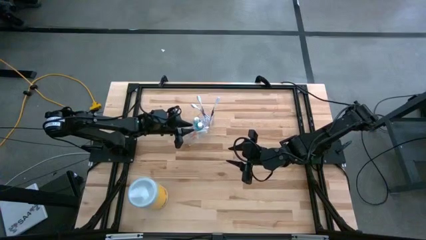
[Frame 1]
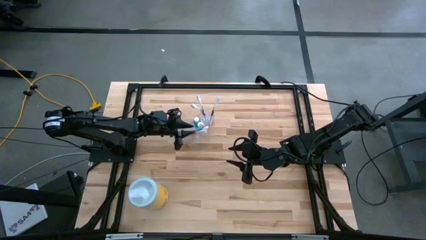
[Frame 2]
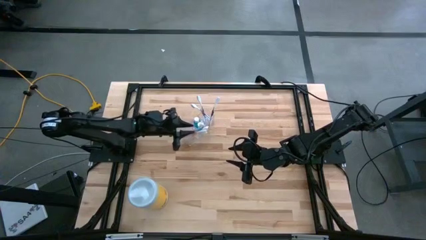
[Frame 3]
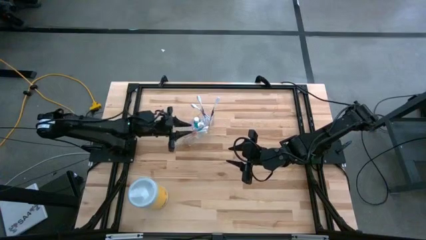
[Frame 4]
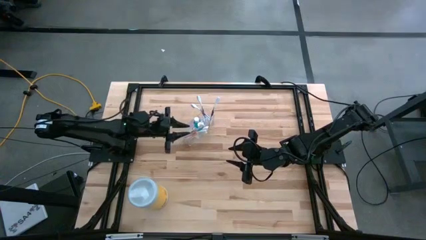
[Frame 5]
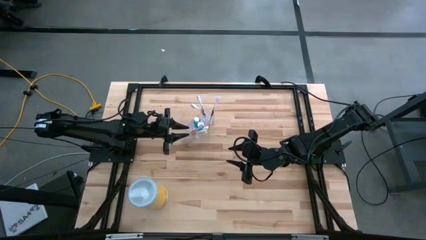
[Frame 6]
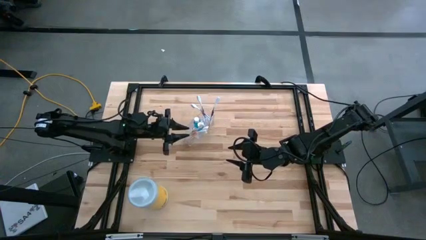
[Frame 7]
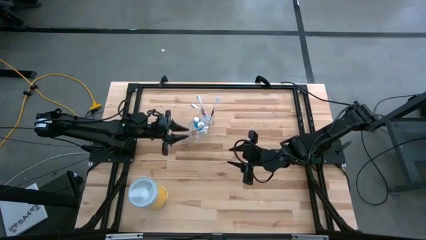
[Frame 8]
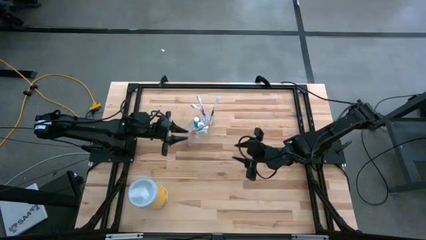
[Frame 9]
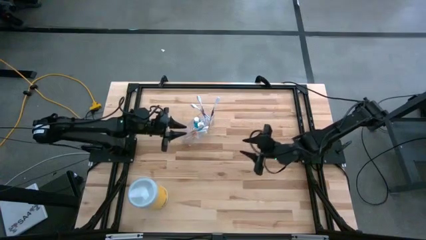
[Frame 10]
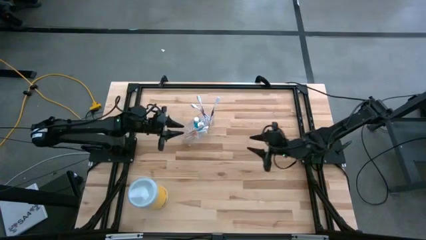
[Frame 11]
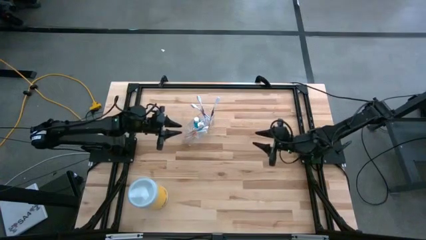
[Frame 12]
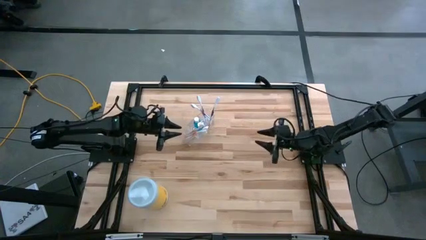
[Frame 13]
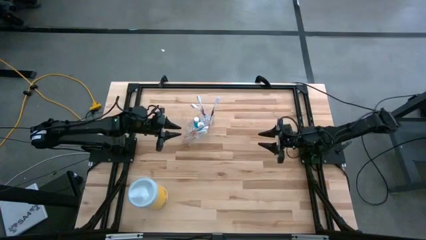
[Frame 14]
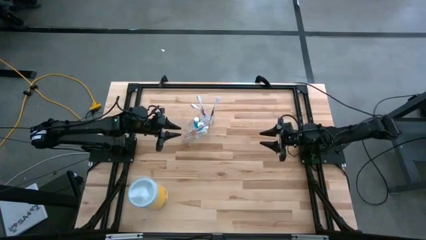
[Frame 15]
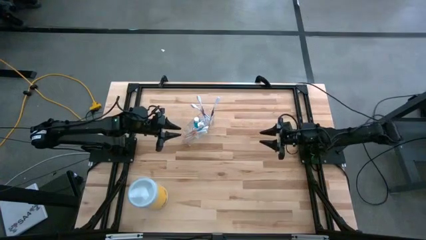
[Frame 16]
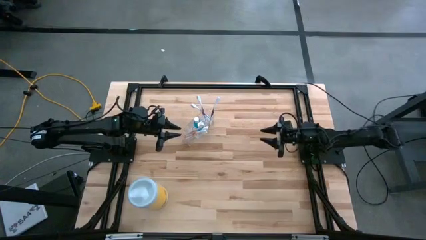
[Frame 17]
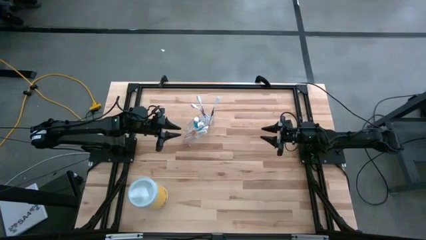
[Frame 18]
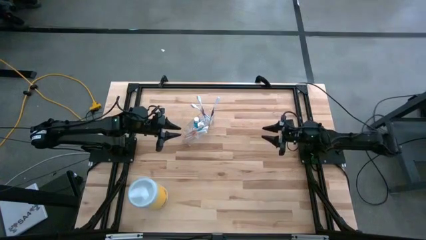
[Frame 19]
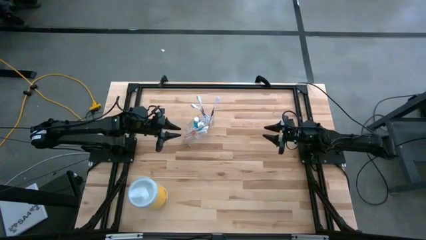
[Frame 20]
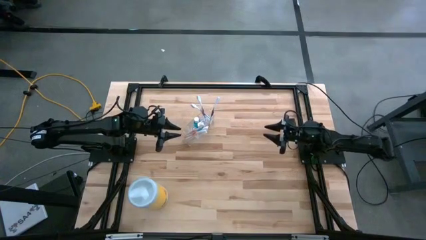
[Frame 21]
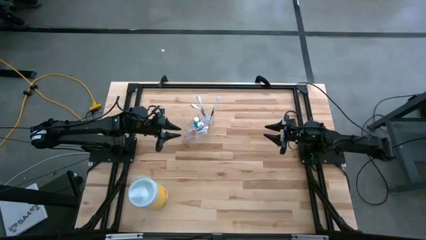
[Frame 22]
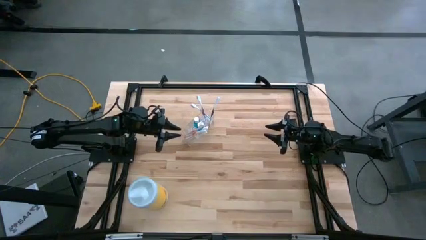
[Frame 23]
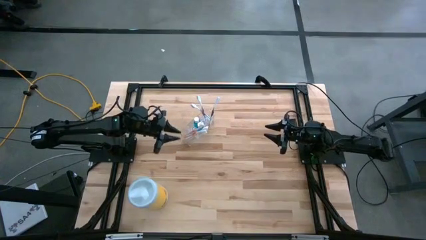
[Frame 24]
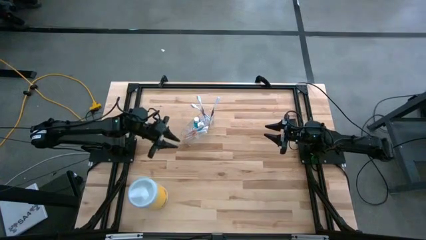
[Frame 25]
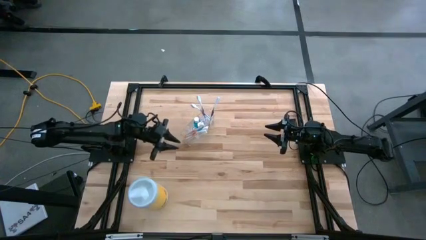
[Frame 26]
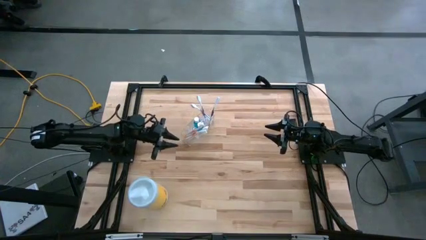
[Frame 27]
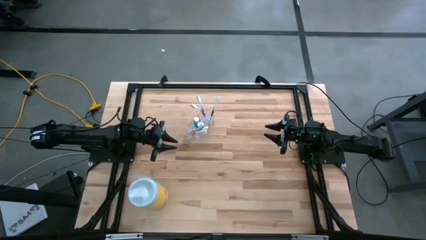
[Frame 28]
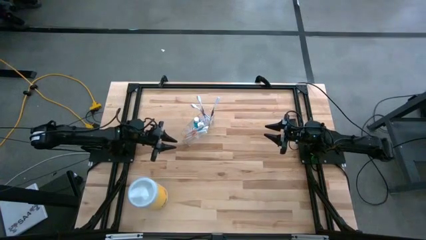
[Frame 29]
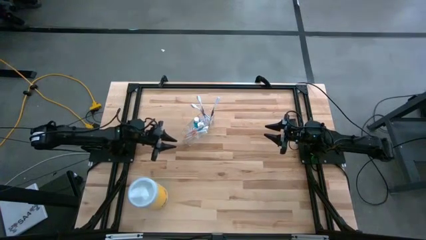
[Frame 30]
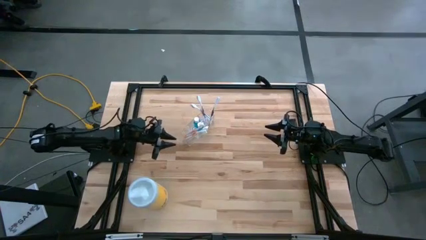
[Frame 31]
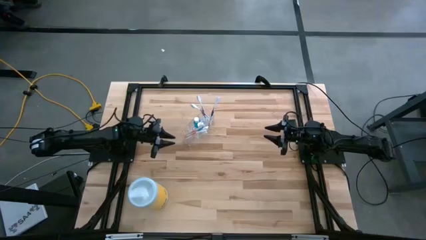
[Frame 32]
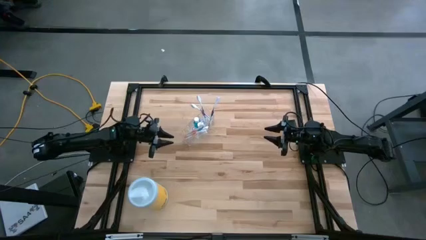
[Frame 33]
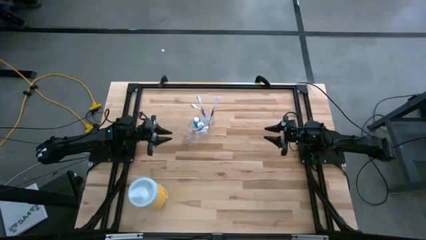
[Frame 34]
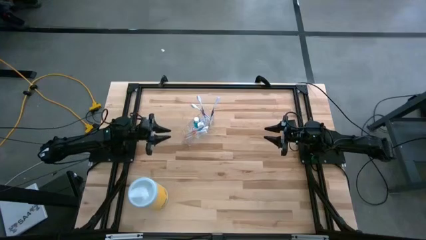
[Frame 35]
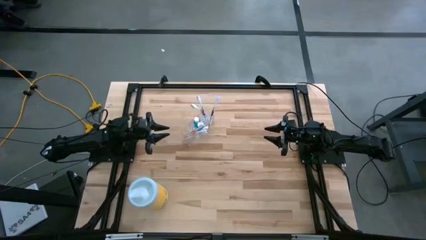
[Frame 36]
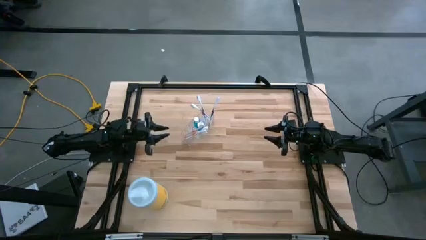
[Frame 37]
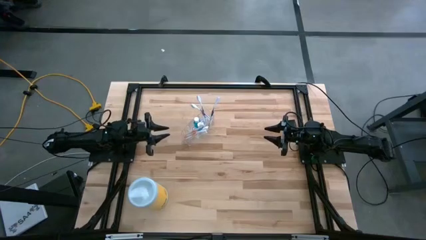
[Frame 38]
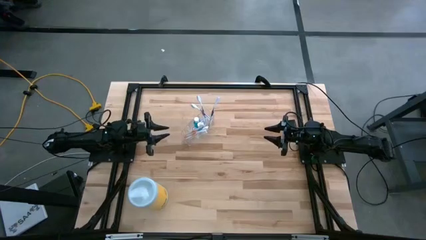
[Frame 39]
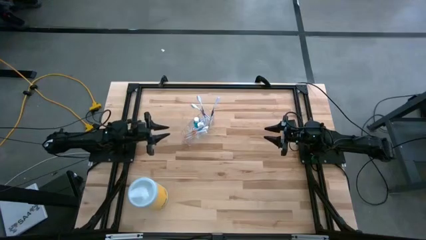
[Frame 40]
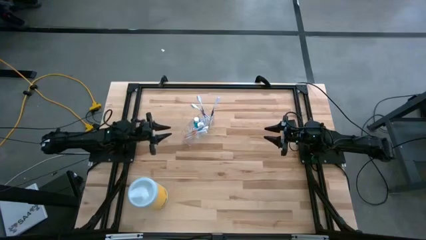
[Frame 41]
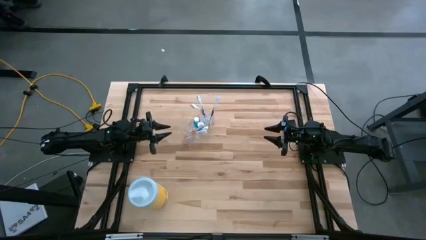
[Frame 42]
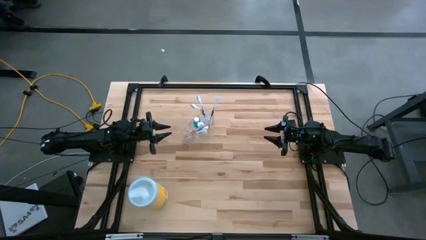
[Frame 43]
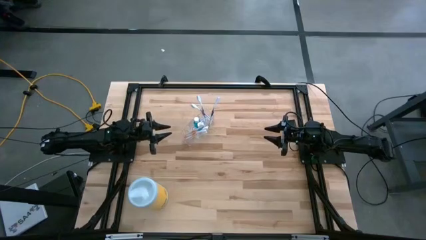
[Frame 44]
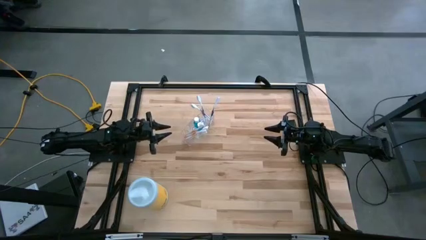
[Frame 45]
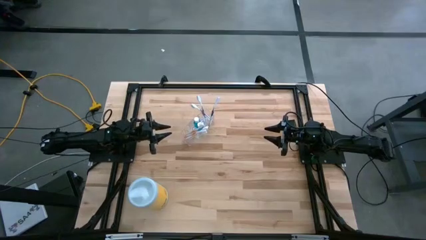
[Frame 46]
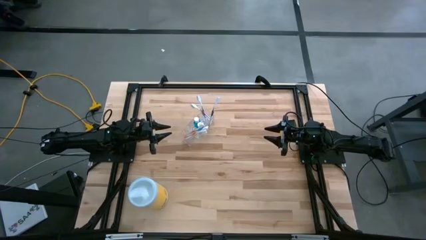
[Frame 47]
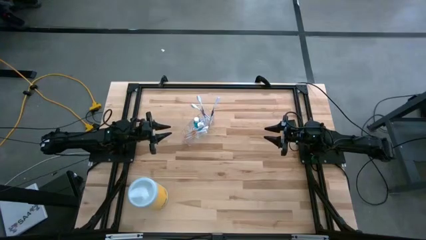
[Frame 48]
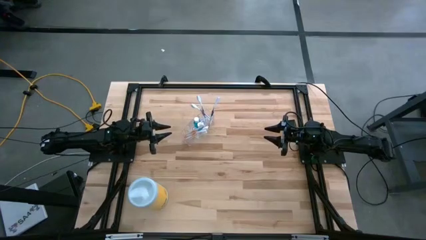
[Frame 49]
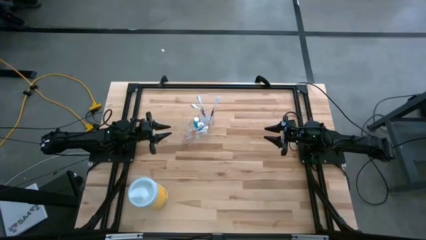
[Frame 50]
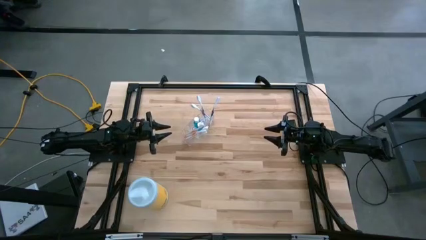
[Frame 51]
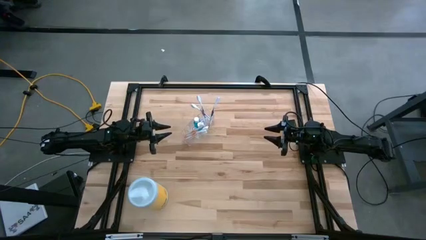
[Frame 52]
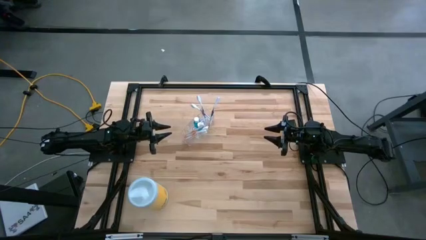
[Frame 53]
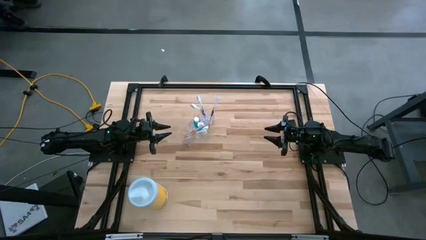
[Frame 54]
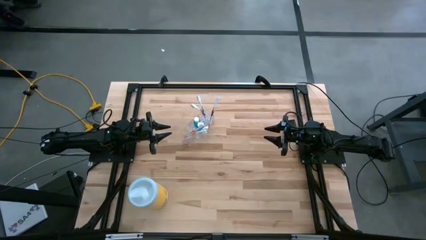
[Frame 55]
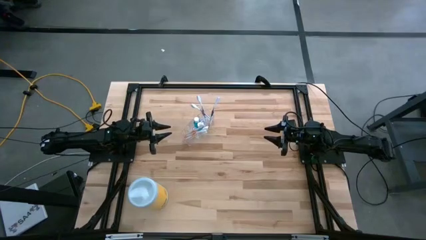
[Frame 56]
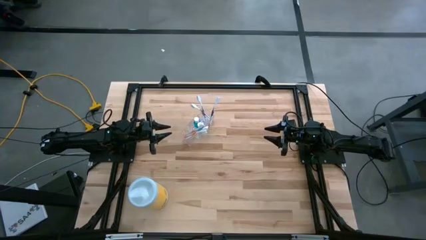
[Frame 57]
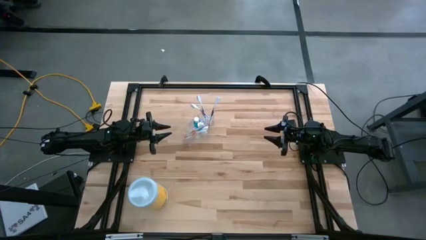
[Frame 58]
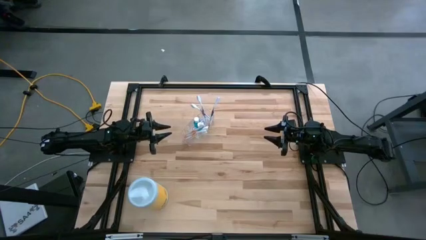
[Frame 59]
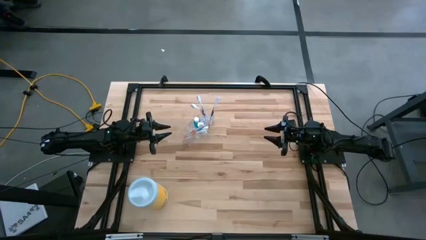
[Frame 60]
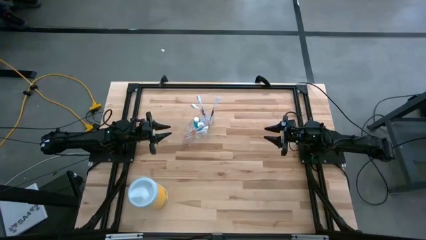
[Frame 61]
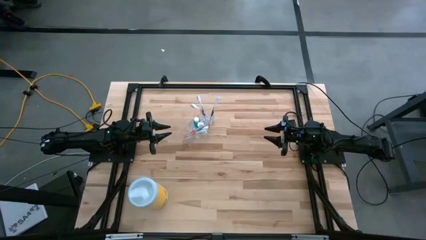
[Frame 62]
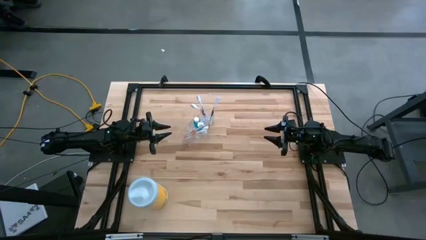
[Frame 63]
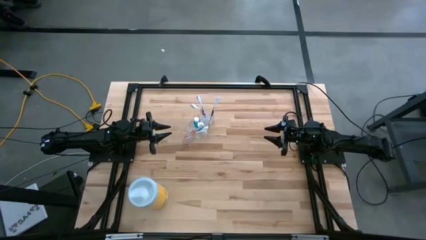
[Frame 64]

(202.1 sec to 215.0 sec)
Task: Pick & Place toothbrushing station
Return to Home Position
